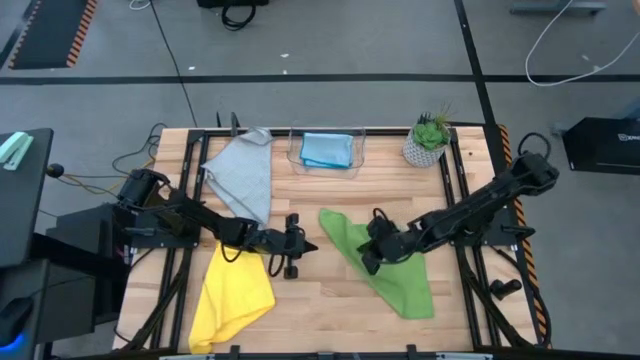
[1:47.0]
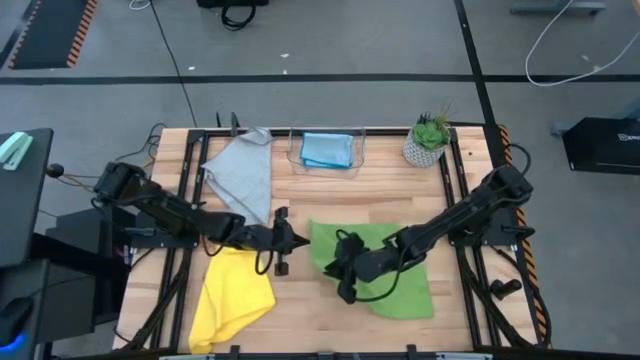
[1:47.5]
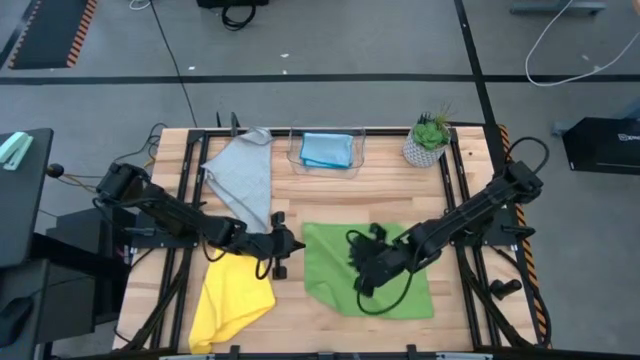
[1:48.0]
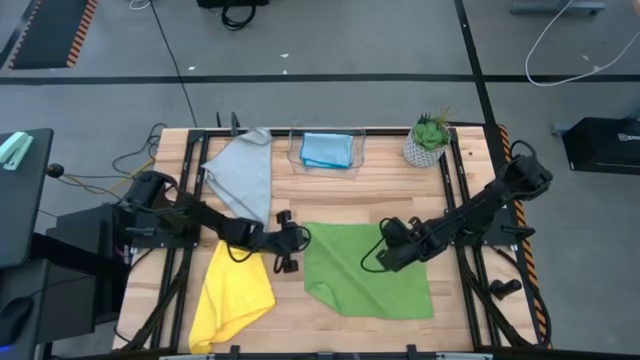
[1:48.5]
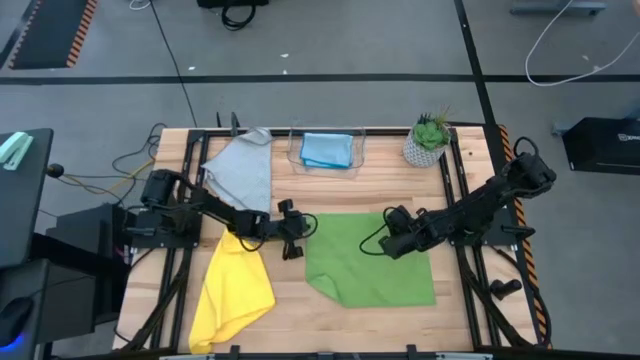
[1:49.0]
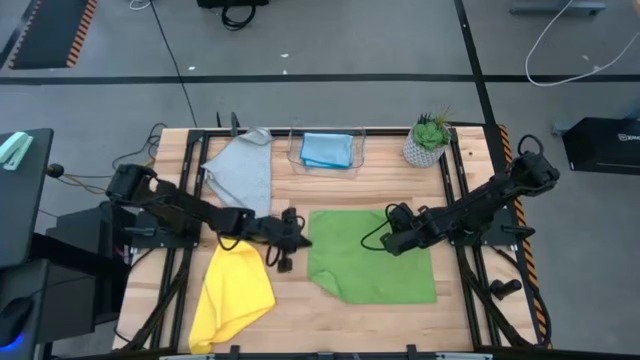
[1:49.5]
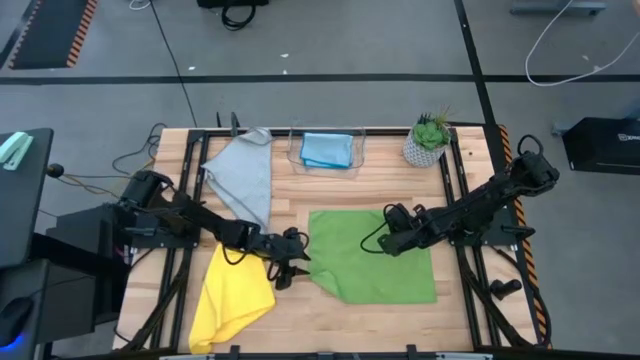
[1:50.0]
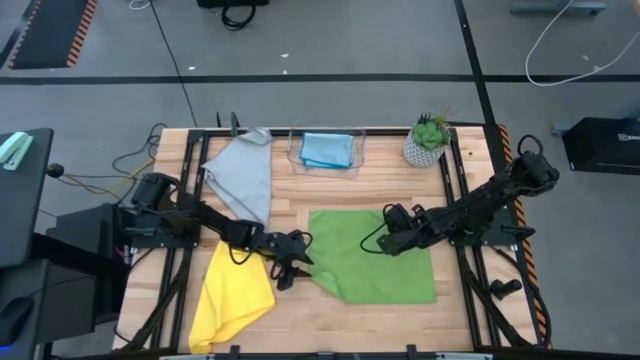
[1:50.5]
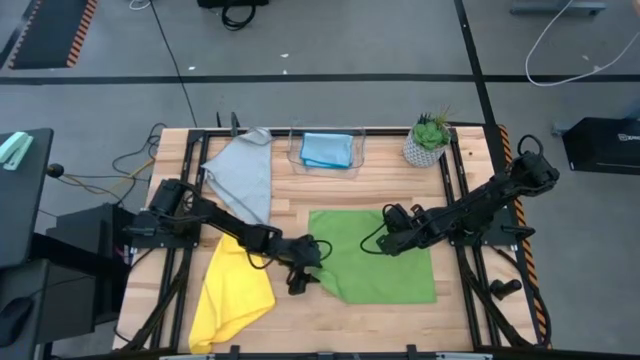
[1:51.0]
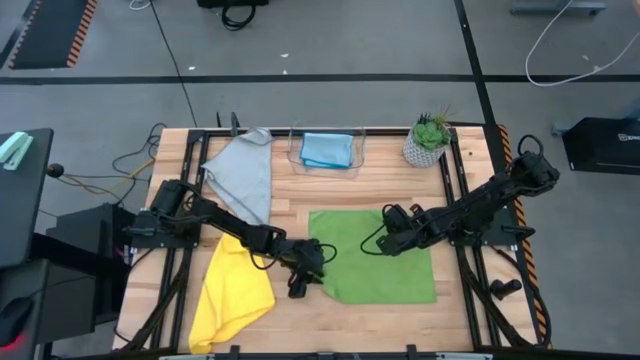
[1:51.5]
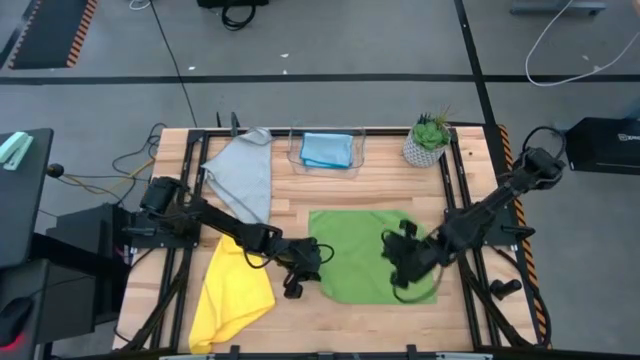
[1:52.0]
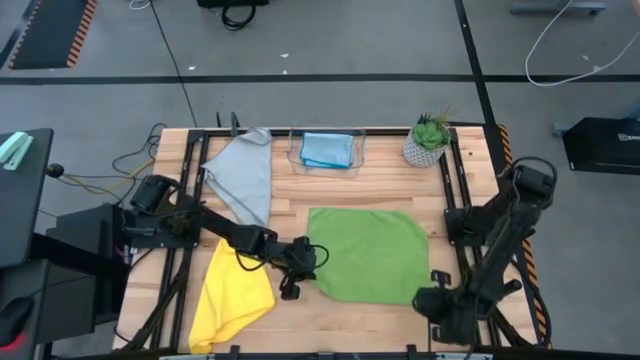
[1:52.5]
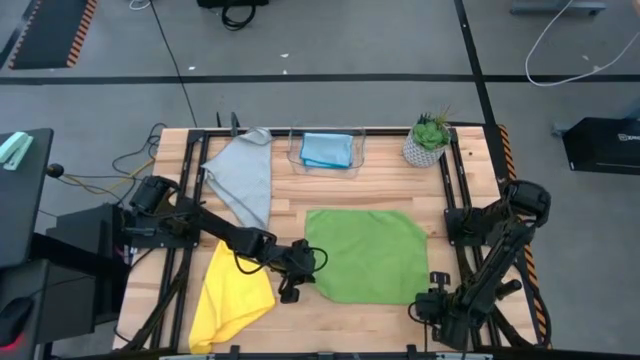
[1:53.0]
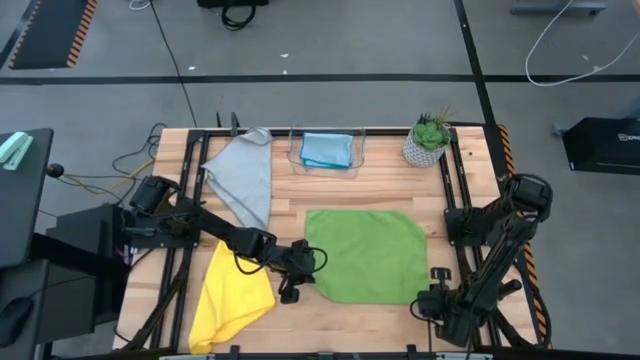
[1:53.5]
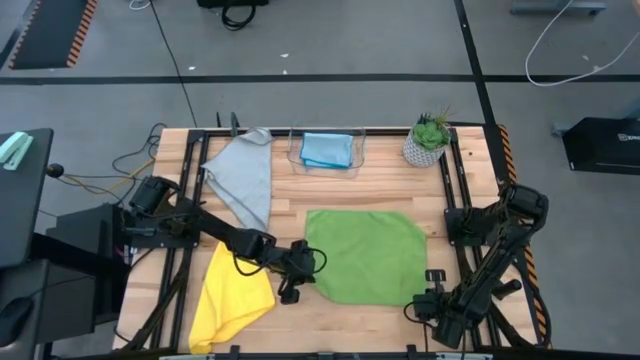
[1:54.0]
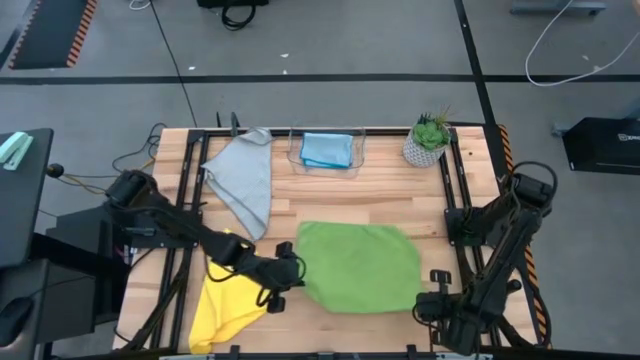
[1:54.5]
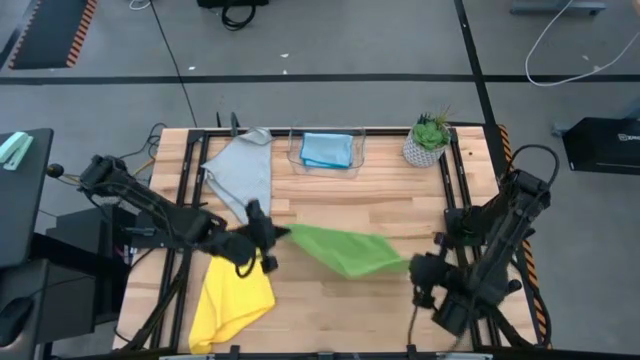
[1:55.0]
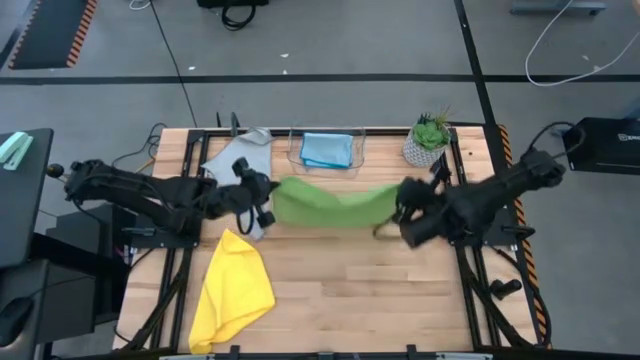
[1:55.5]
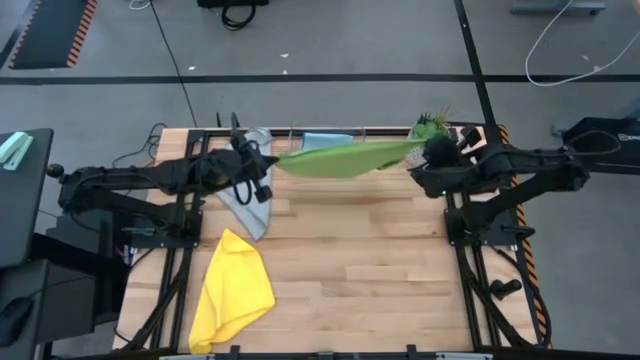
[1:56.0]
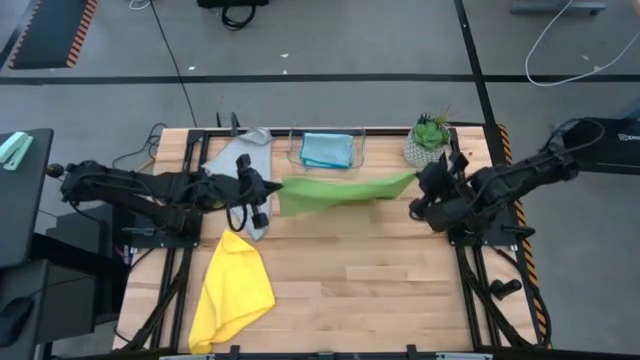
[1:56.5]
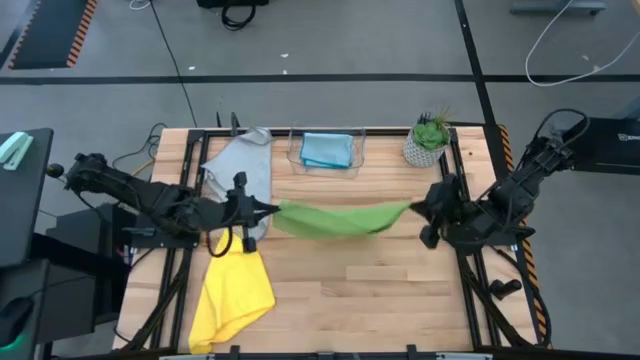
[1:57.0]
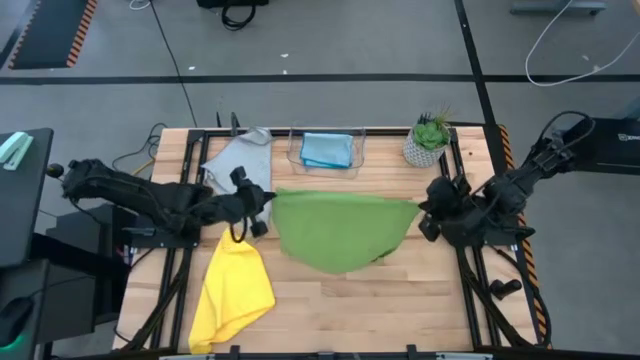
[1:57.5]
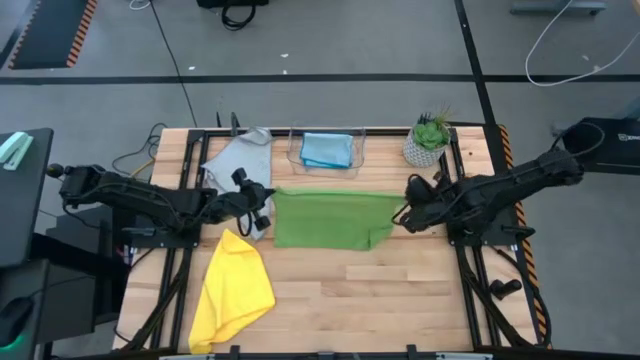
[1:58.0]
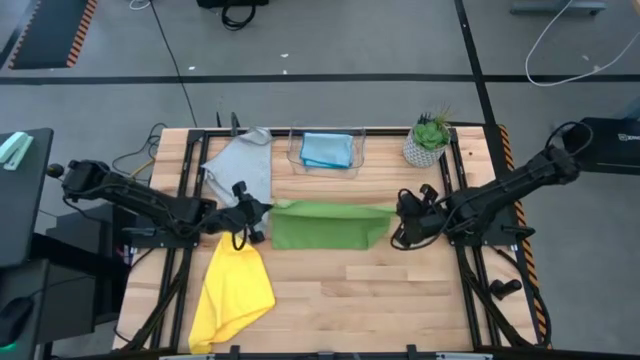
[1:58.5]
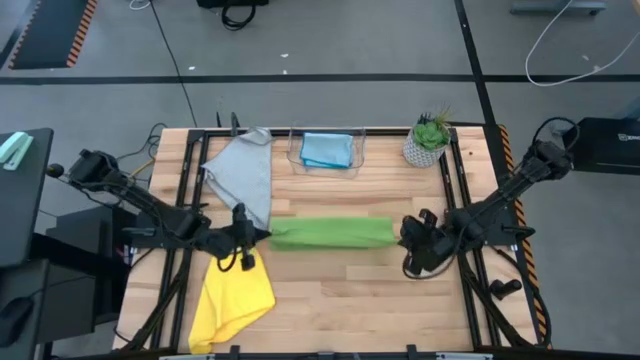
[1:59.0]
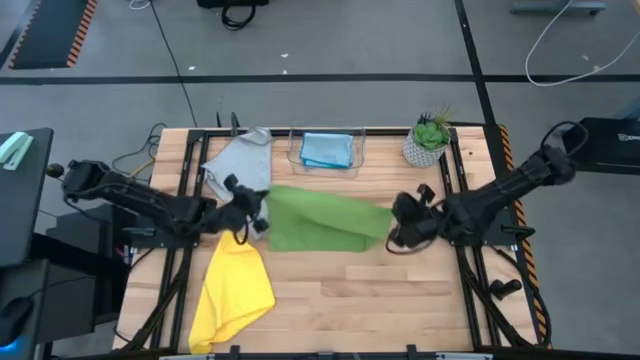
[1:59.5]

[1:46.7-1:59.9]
Task: Fold microfiber towels
Fold the green microfiber towel

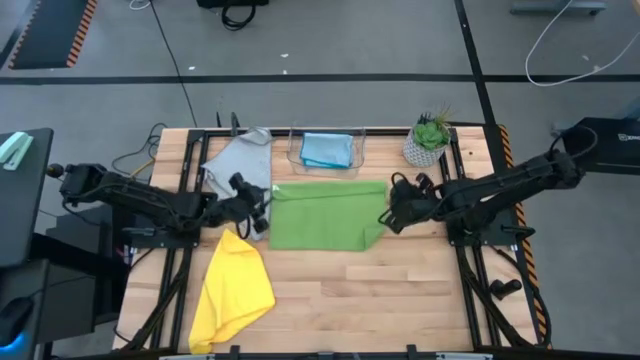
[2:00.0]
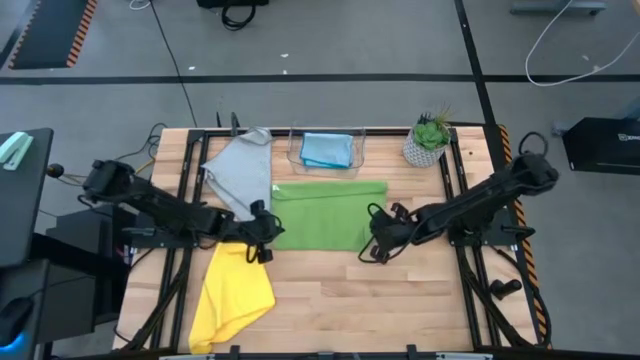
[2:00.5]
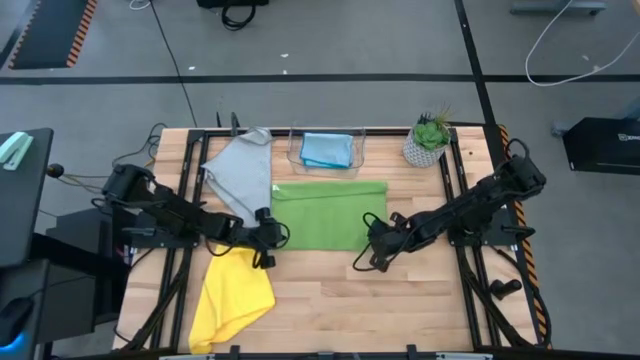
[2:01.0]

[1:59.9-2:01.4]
Fold the green microfiber towel
